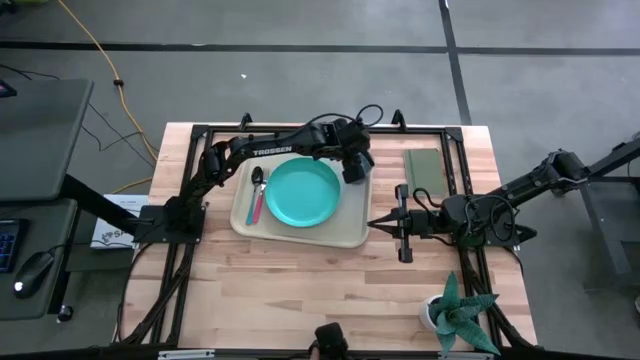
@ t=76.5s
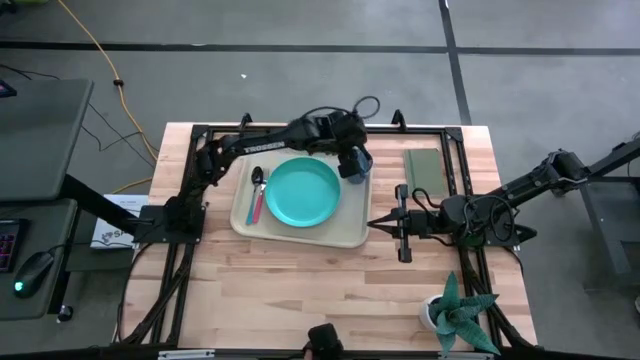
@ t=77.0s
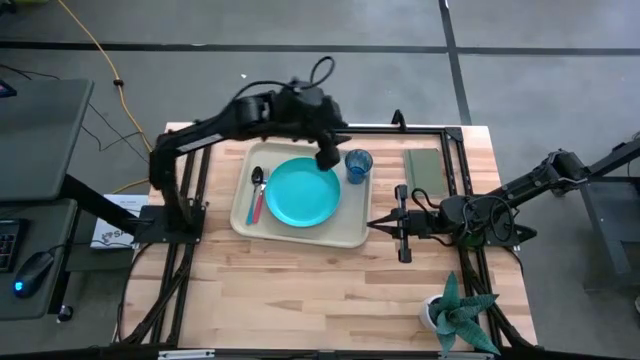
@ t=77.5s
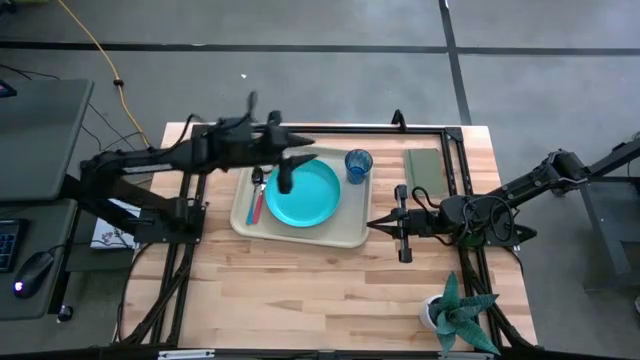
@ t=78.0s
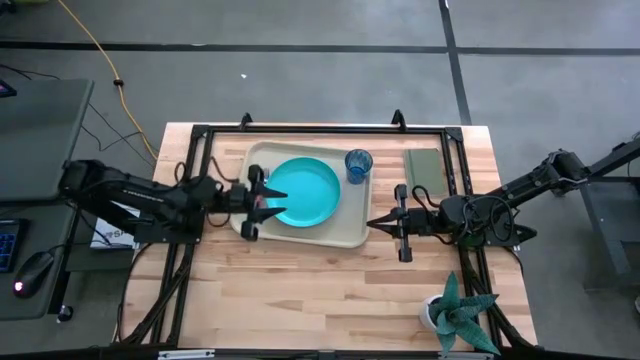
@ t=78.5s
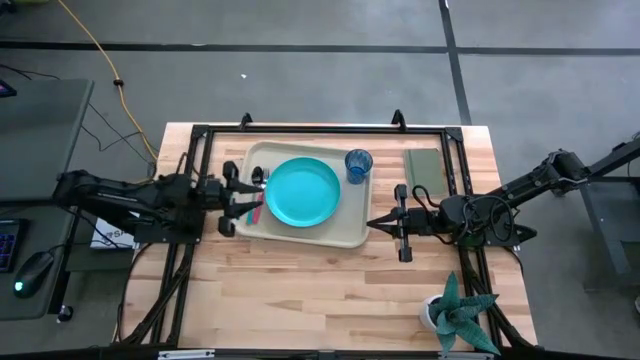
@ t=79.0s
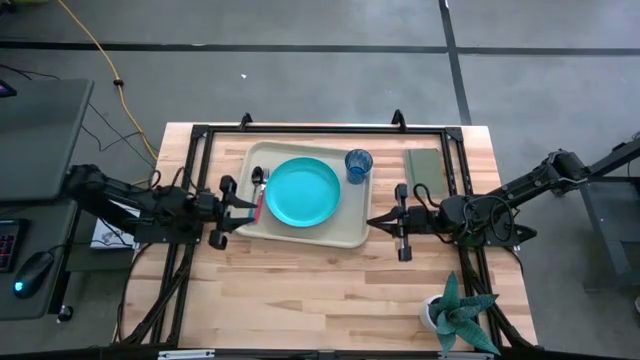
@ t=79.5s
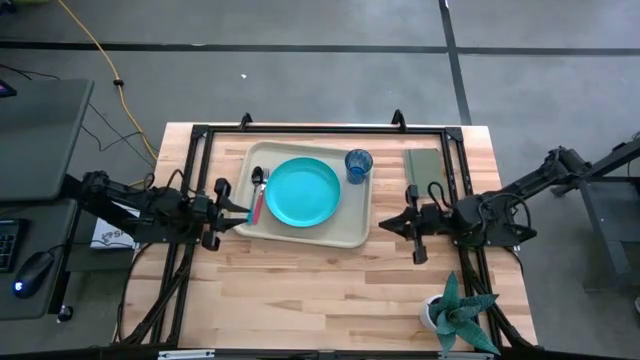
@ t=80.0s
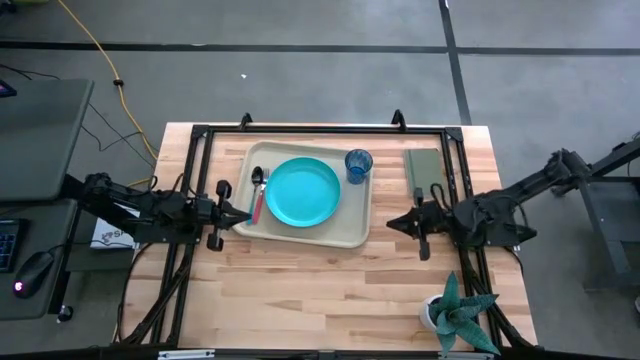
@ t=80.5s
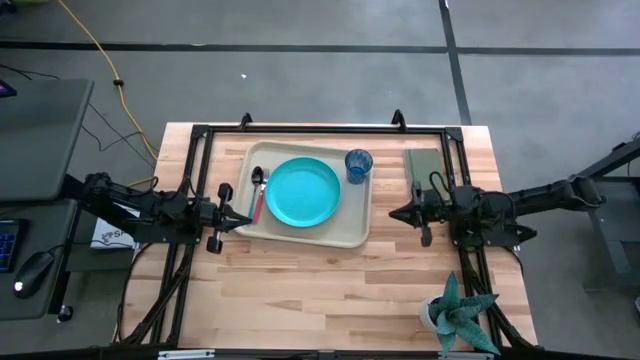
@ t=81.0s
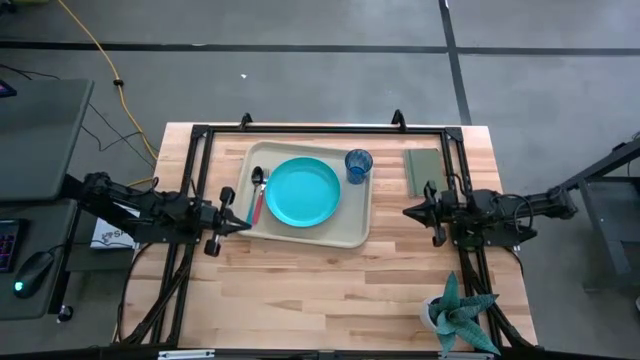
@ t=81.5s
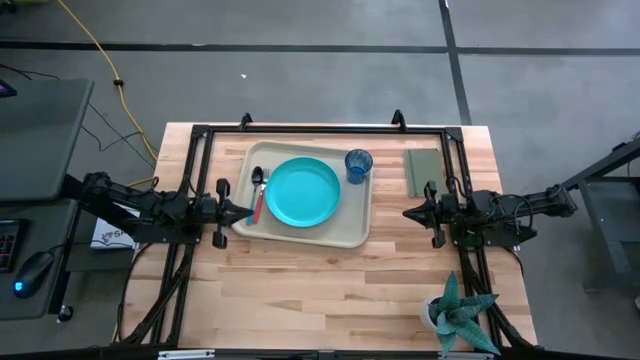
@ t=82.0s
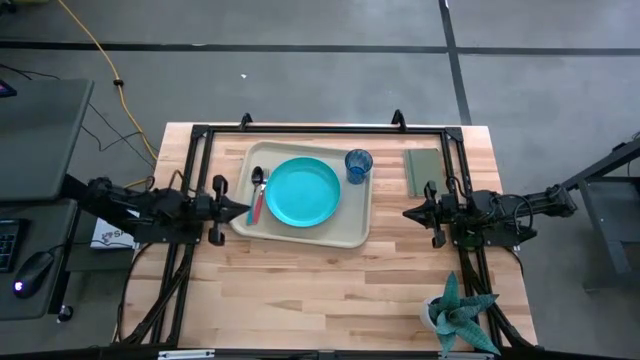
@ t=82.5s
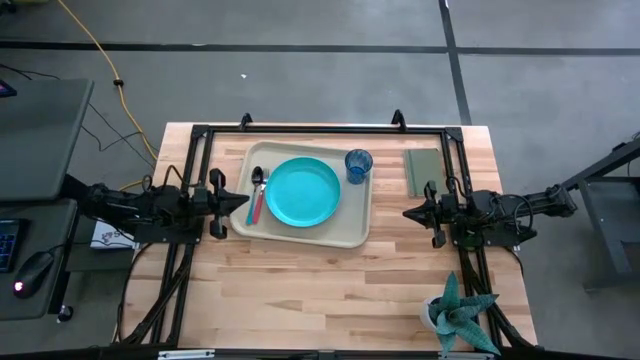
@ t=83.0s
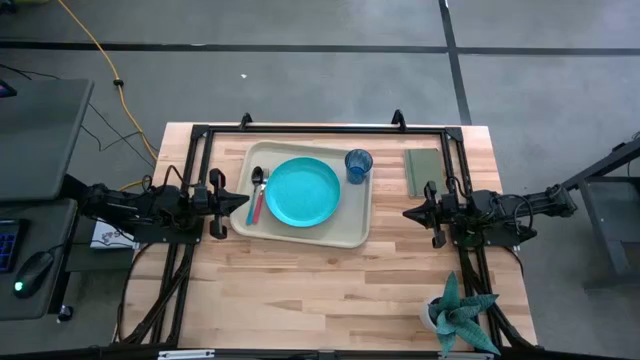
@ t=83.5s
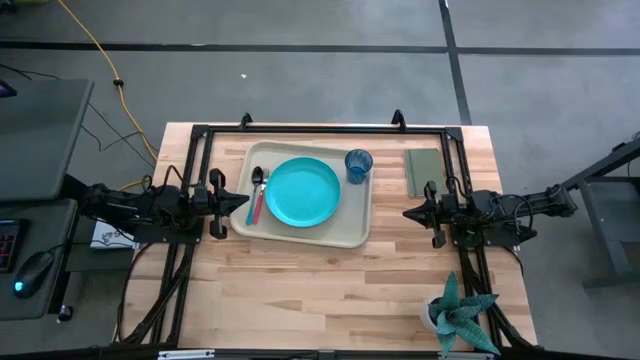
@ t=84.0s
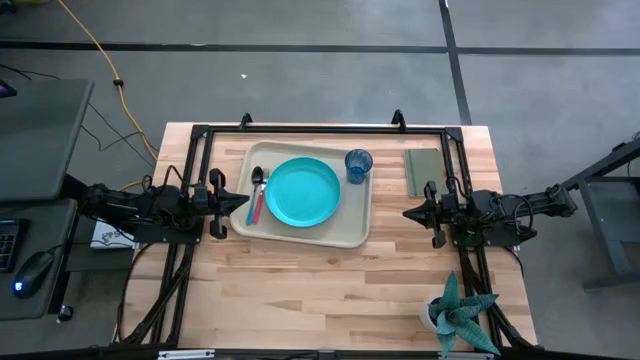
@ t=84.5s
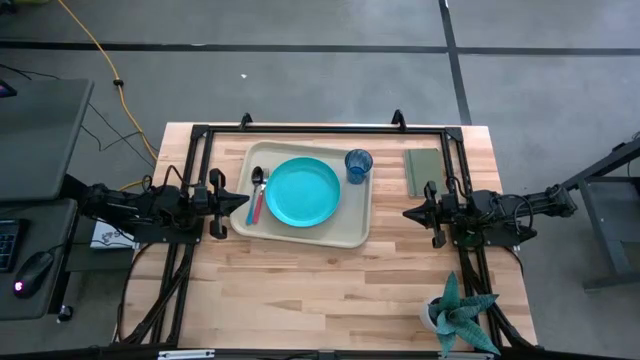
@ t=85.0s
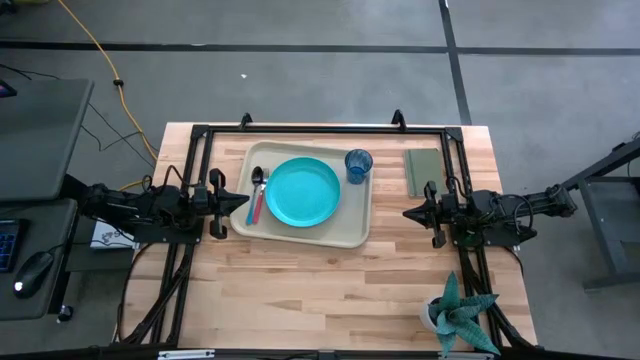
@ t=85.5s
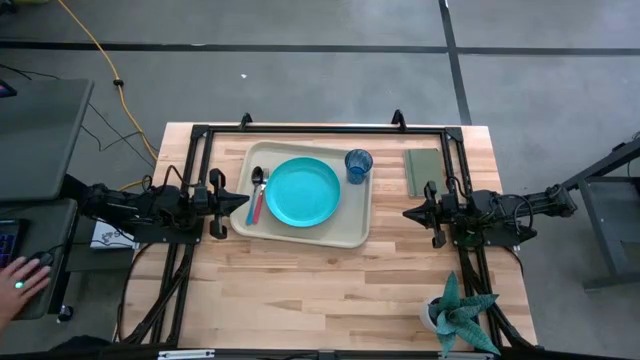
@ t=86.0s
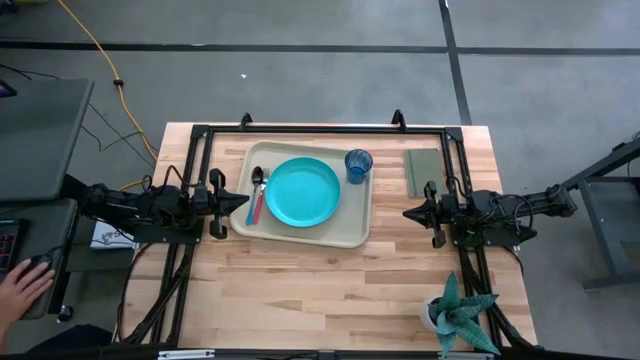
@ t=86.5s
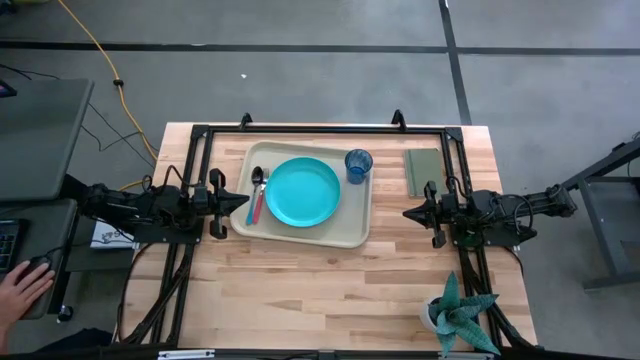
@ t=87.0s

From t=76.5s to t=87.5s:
Task: Pick and place plate/cup/fork/spoon on tray
Return to Home Position

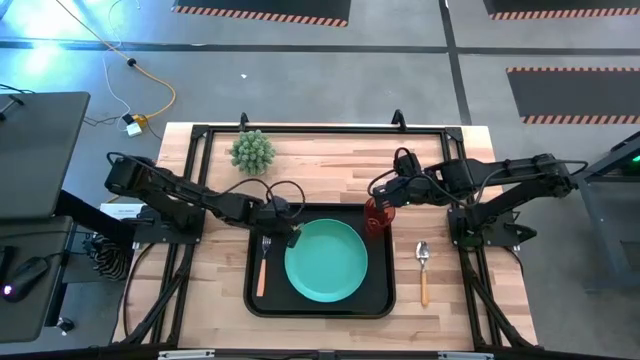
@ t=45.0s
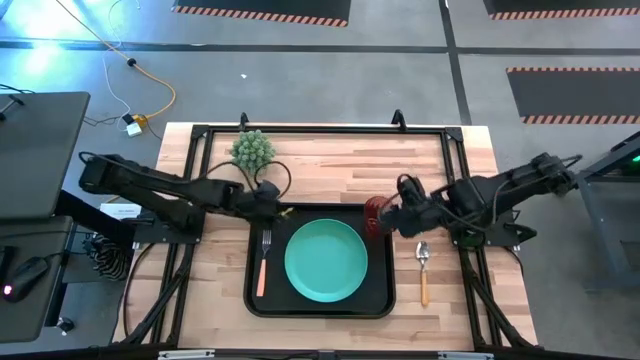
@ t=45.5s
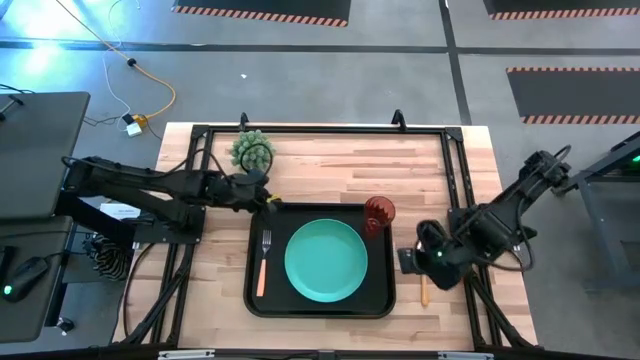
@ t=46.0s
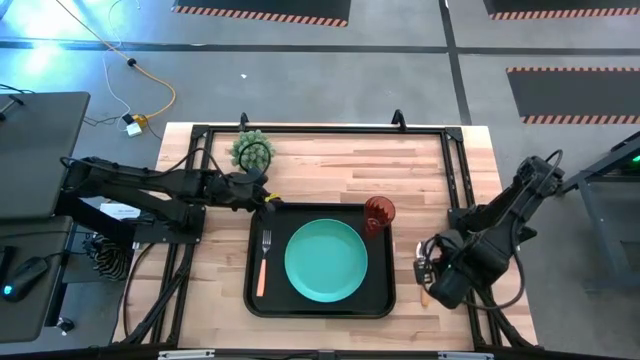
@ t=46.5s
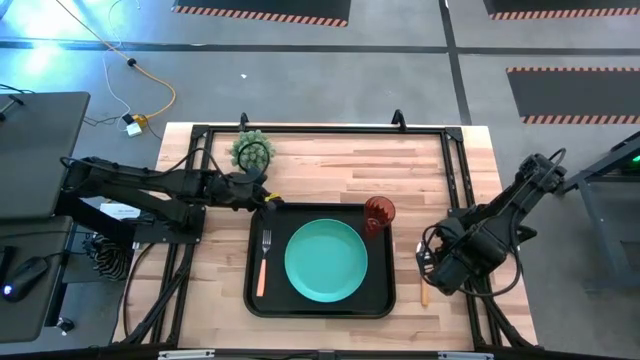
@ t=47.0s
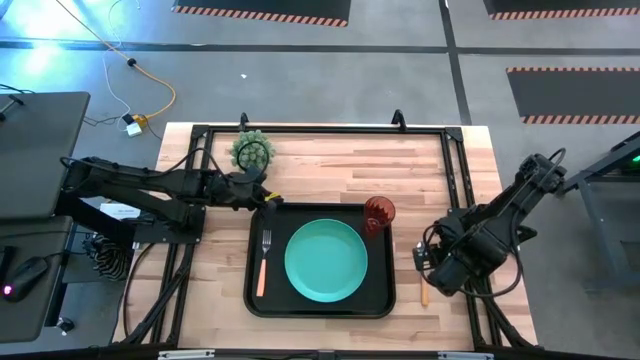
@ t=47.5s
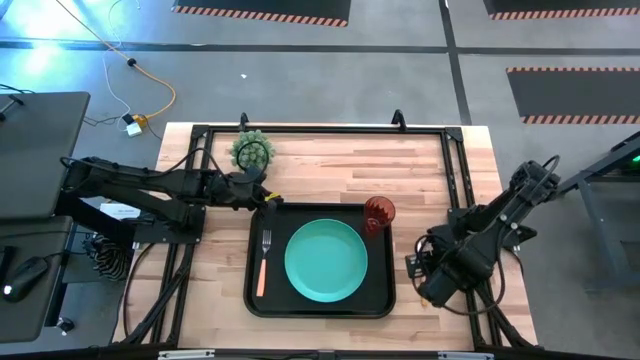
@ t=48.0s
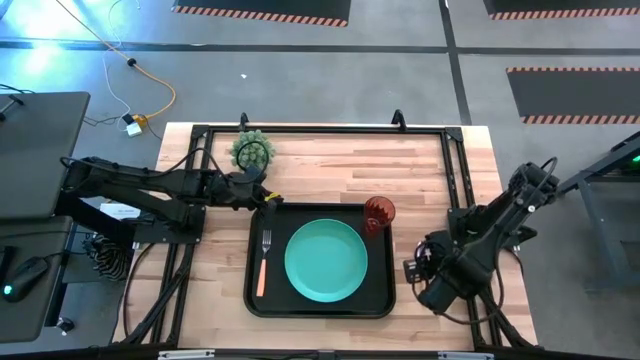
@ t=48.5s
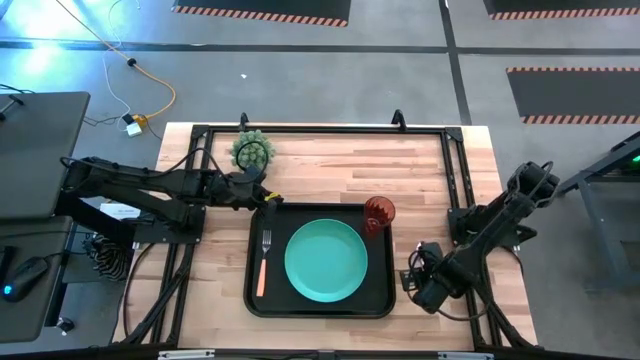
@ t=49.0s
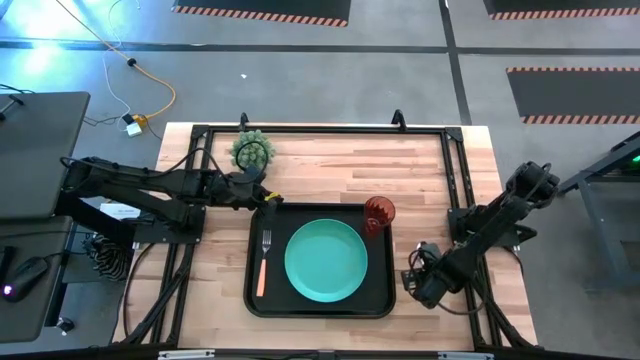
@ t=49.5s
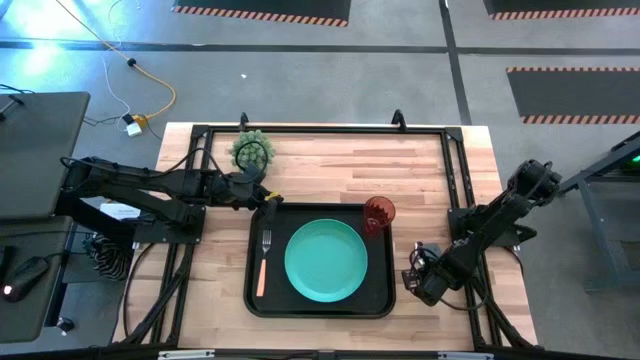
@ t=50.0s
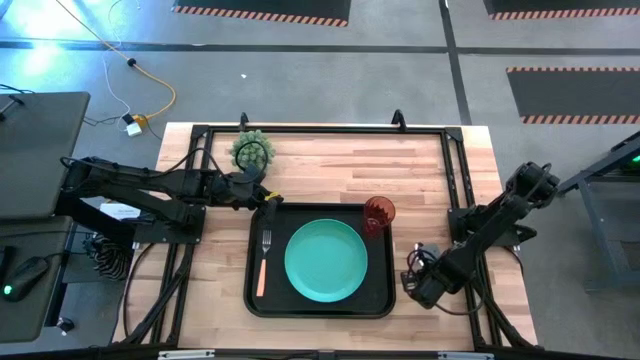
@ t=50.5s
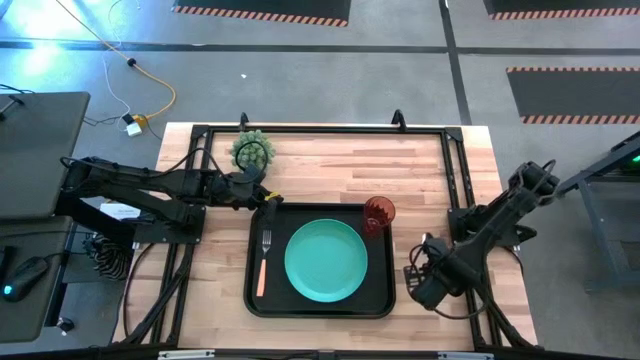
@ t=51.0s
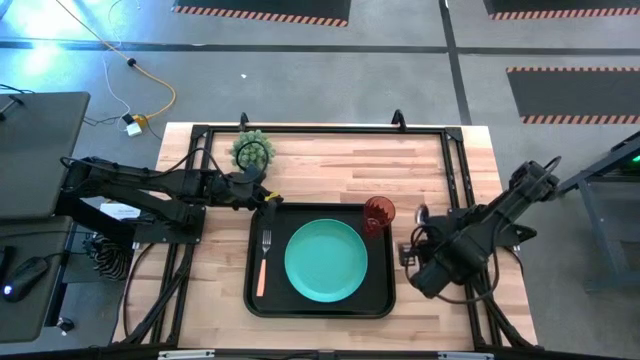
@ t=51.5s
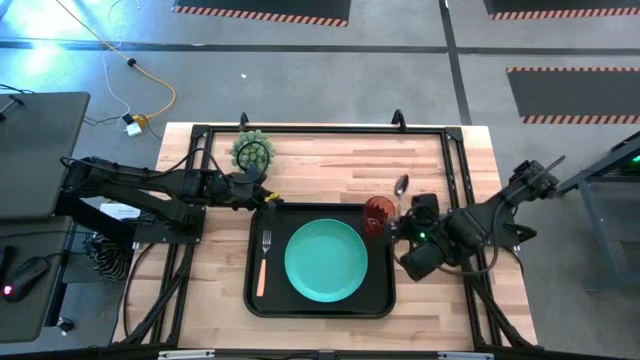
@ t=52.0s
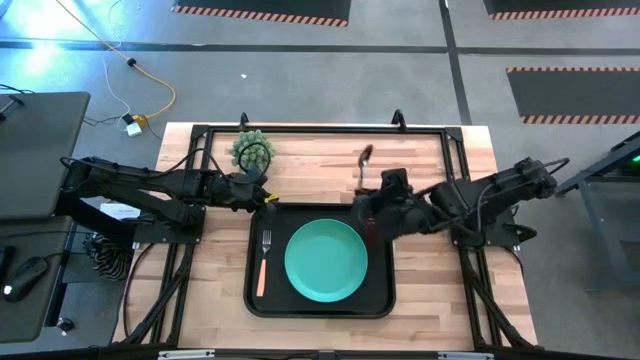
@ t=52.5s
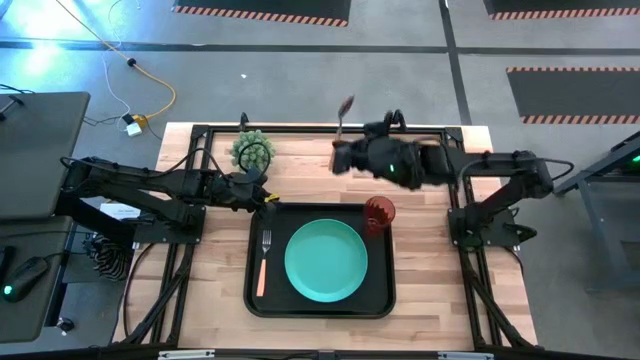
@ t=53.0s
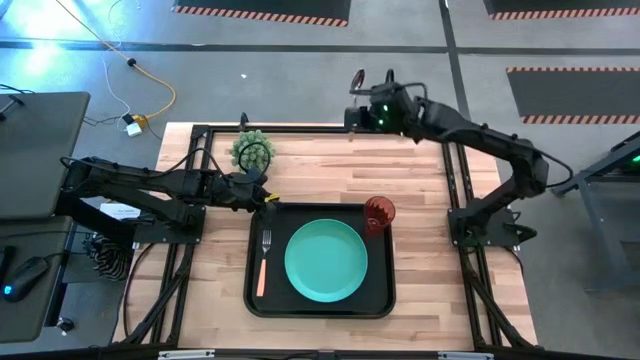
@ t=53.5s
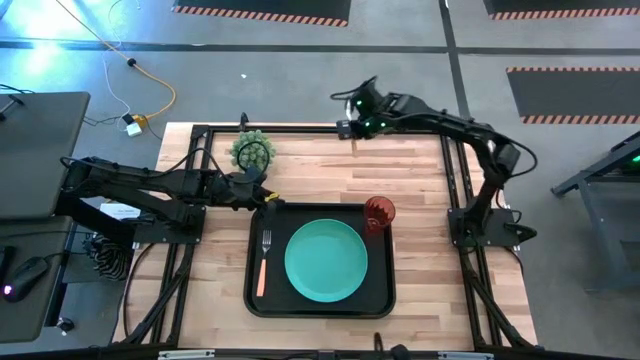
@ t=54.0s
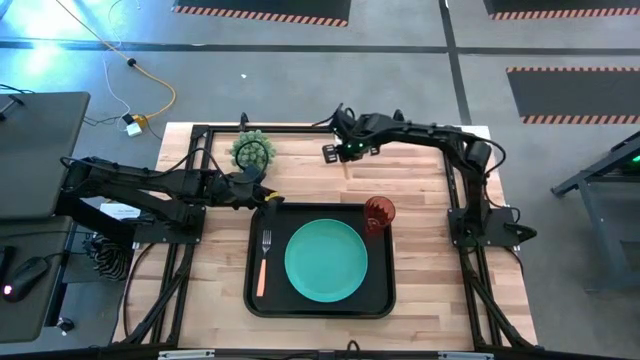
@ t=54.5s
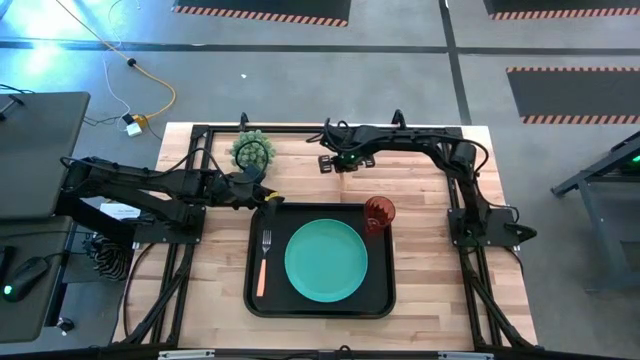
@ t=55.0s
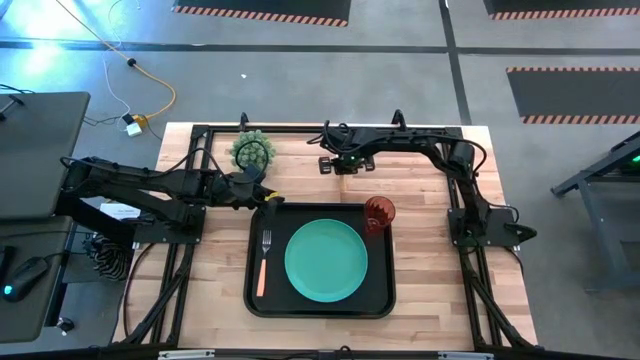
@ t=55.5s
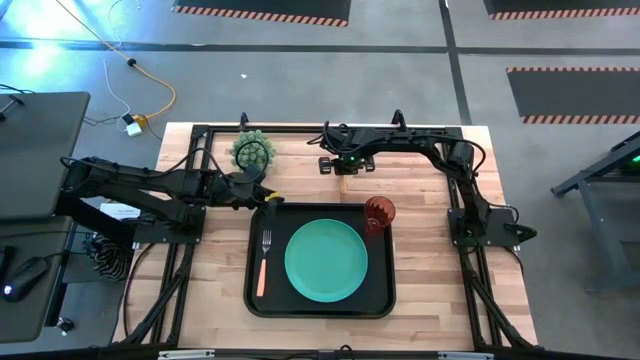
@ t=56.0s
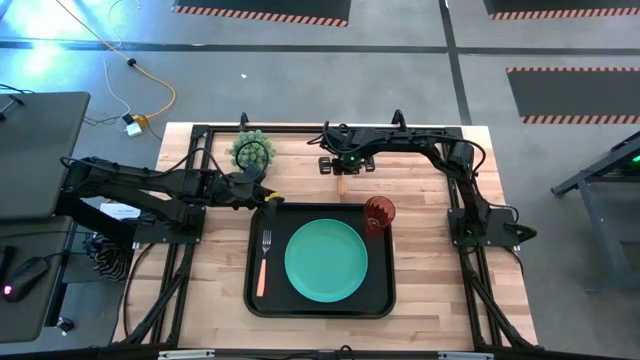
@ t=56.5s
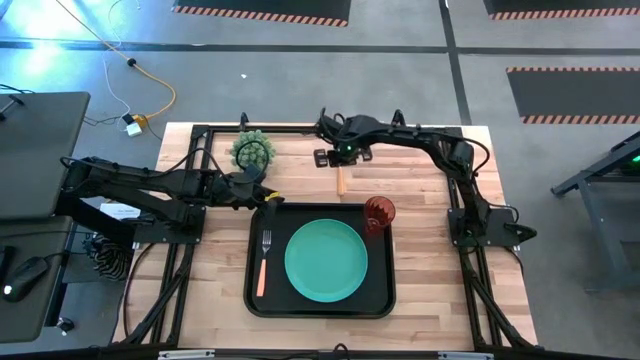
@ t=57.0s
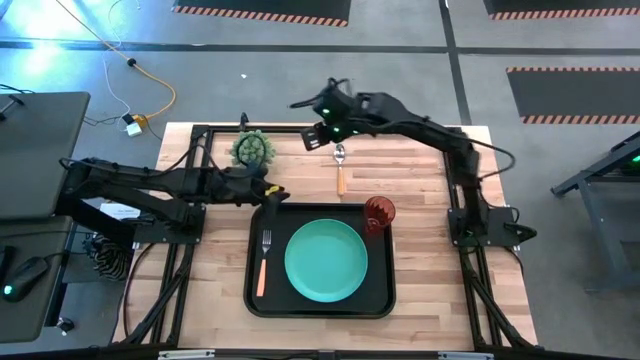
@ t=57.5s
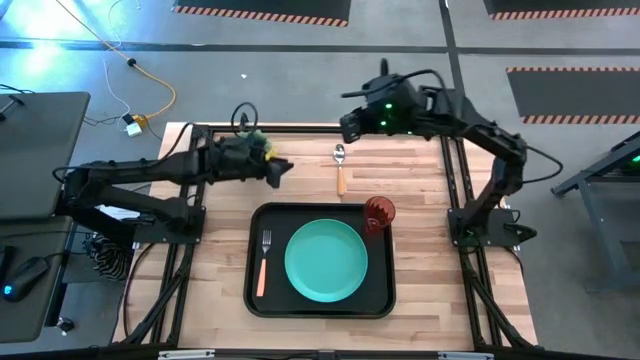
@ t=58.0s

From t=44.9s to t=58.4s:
Task: Pick and place plate/cup/fork/spoon on tray
Put the yellow spoon on the black tray between the orange fork and blue plate
